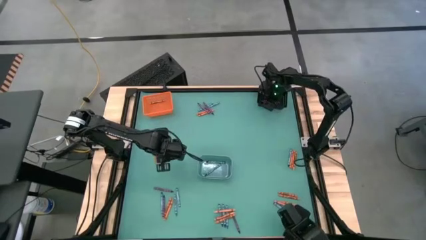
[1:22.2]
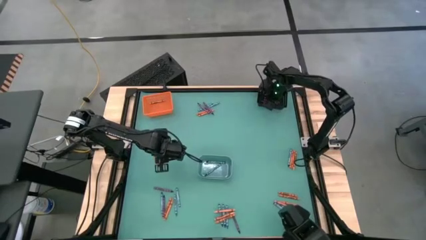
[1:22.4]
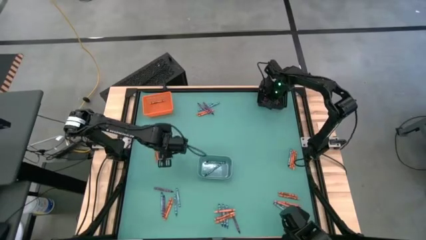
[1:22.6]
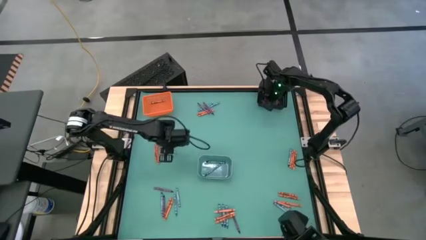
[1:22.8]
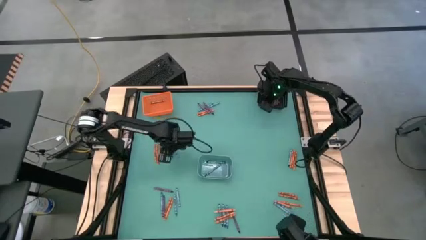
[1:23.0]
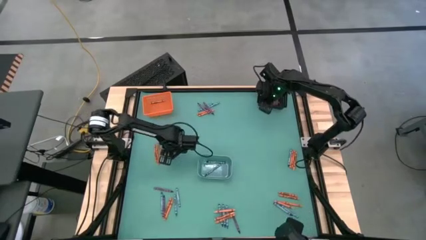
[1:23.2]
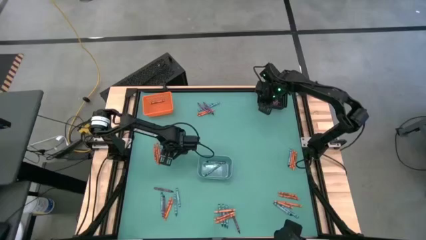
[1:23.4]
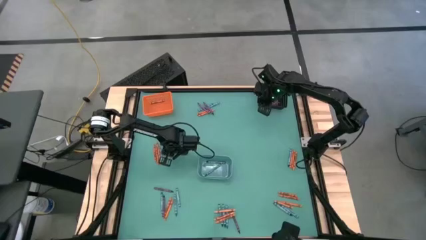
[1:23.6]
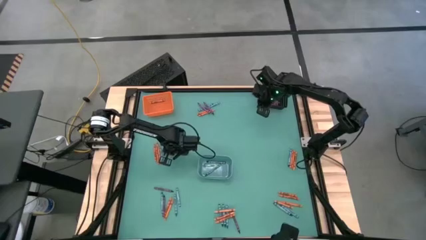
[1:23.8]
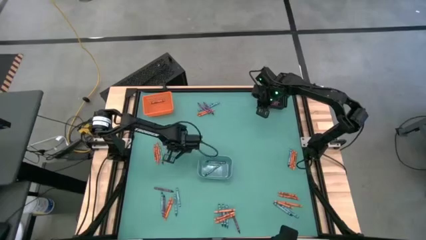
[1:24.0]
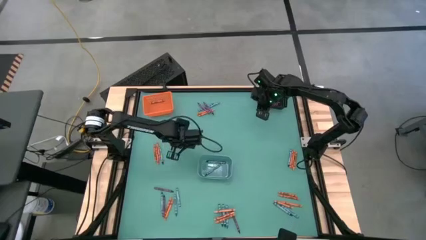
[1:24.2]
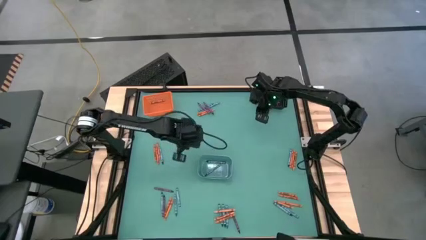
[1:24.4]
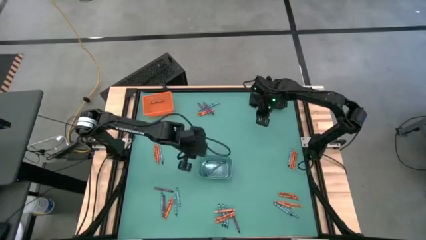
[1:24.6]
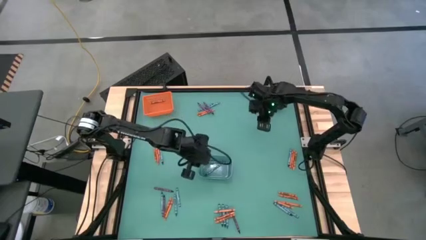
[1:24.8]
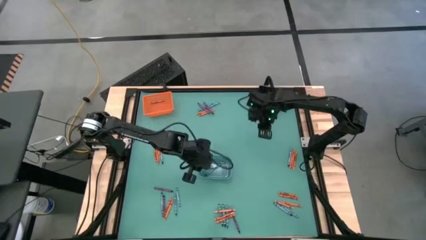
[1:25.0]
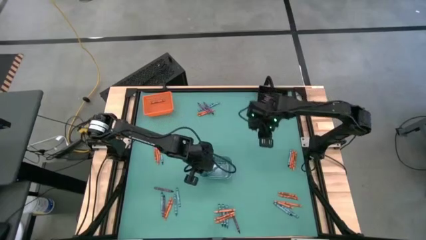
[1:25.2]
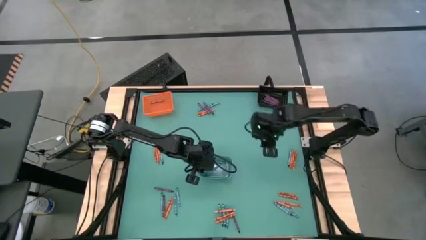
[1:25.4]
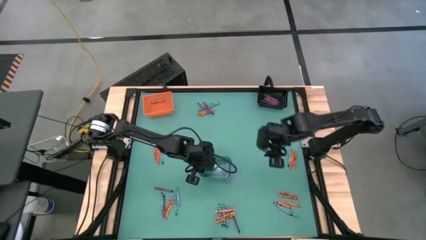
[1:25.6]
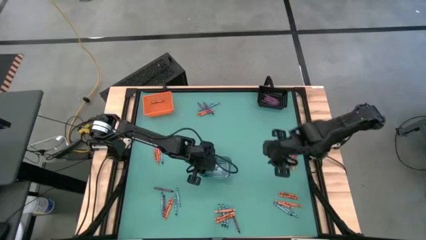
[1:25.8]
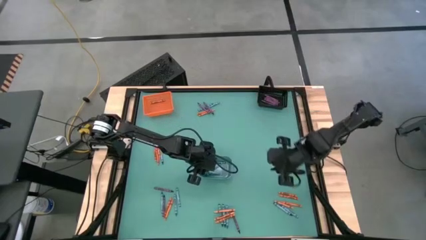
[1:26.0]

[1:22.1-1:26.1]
Task: Sort crayons
Put the light blue crayon into the blue bin

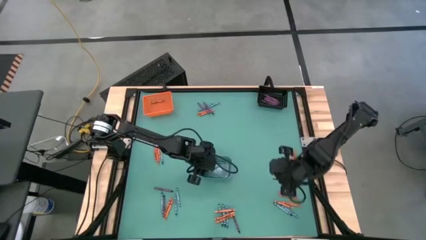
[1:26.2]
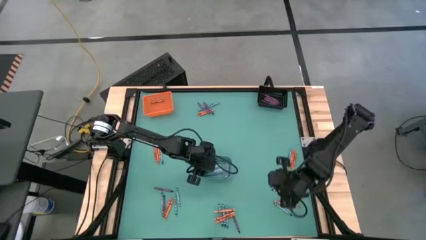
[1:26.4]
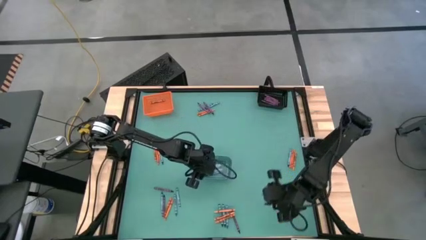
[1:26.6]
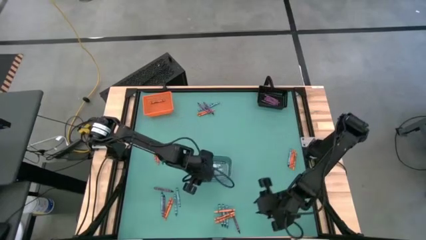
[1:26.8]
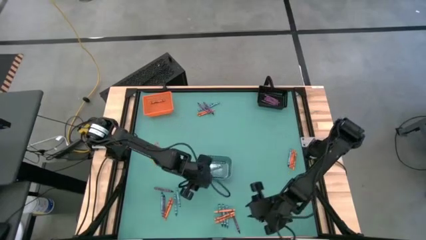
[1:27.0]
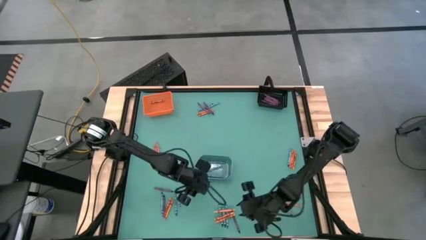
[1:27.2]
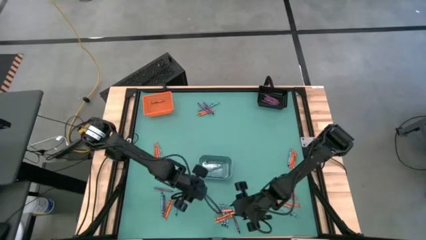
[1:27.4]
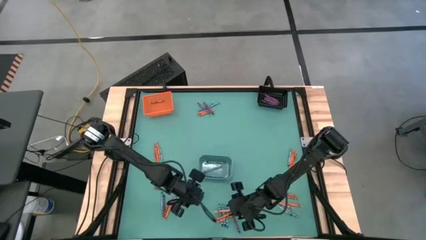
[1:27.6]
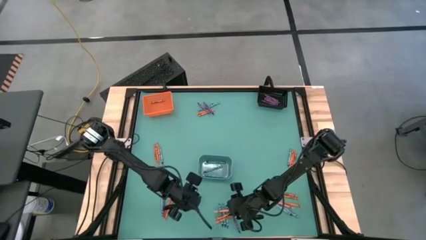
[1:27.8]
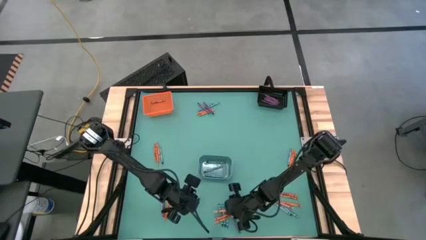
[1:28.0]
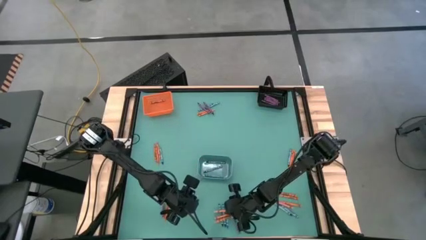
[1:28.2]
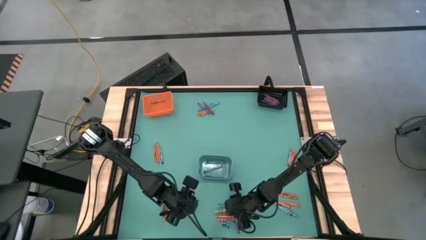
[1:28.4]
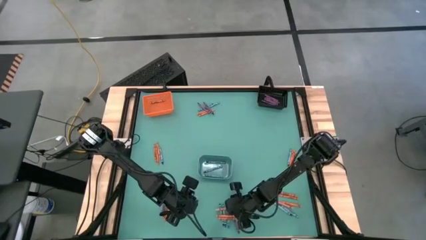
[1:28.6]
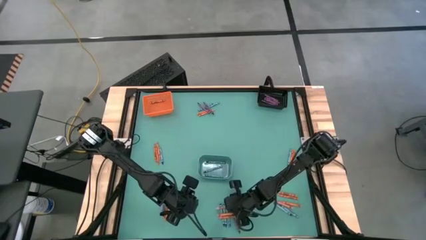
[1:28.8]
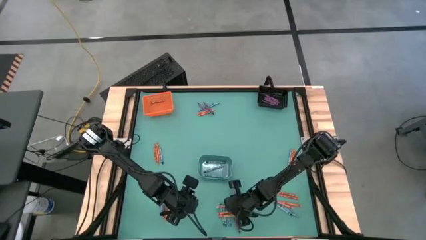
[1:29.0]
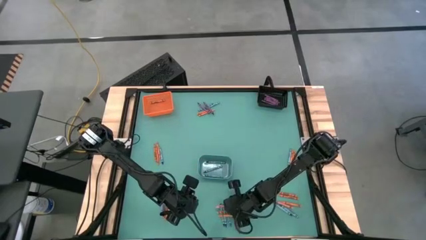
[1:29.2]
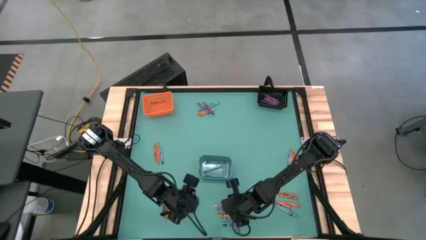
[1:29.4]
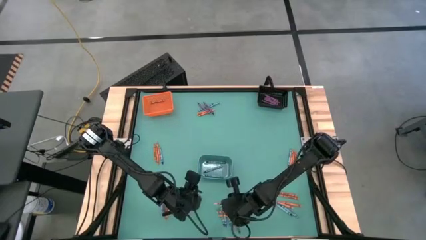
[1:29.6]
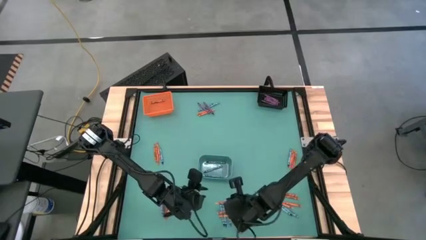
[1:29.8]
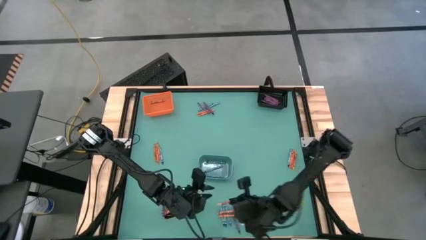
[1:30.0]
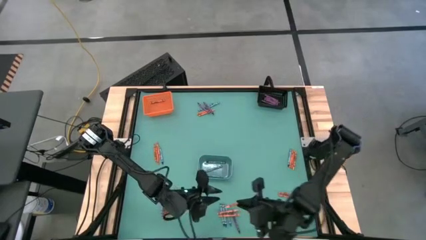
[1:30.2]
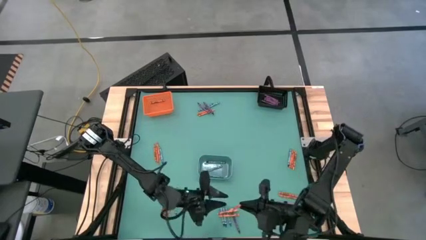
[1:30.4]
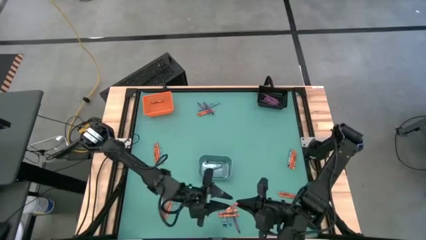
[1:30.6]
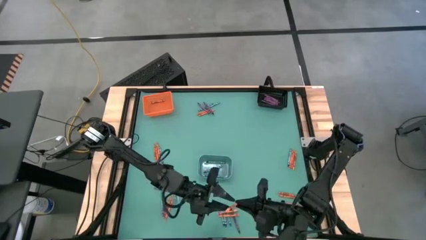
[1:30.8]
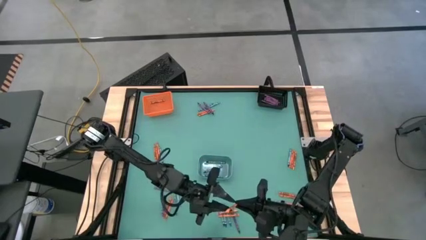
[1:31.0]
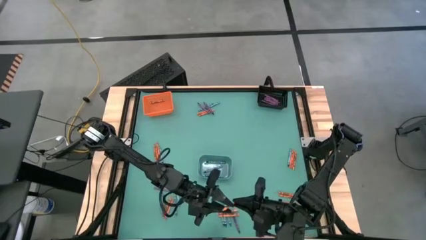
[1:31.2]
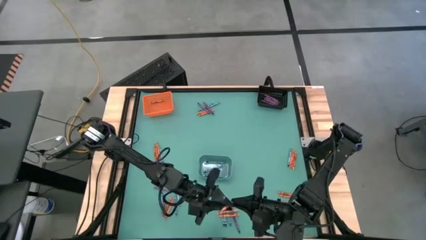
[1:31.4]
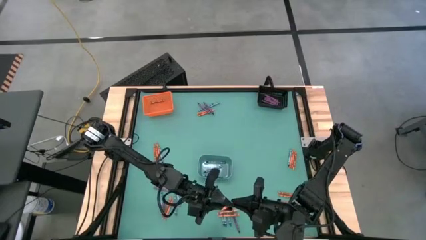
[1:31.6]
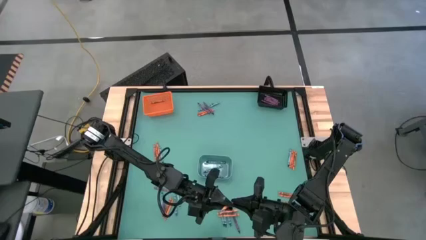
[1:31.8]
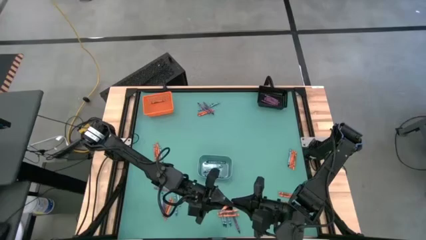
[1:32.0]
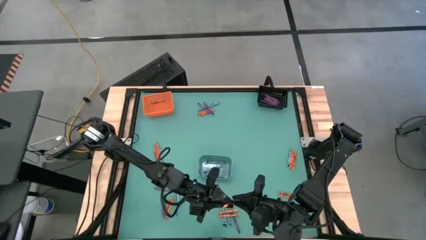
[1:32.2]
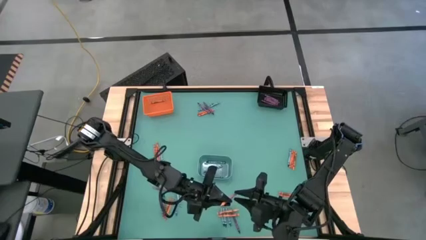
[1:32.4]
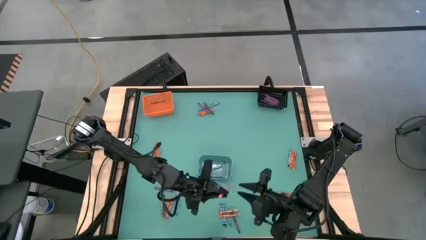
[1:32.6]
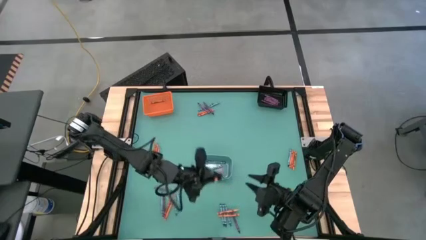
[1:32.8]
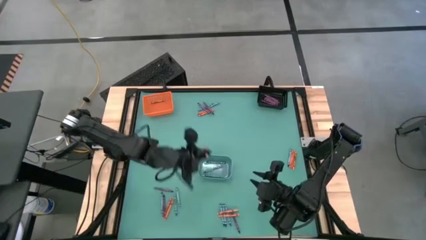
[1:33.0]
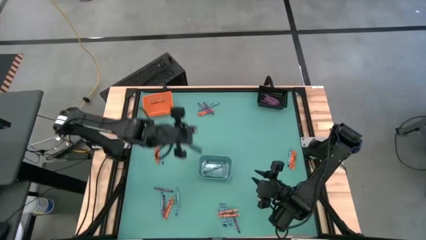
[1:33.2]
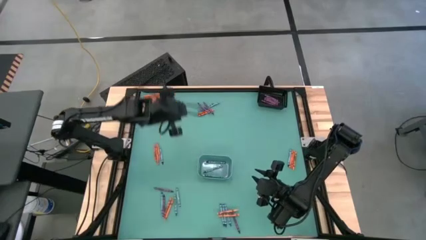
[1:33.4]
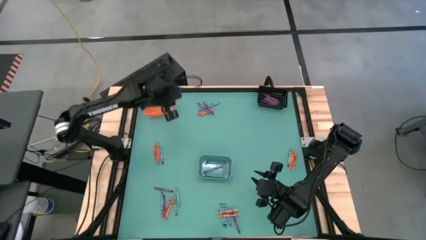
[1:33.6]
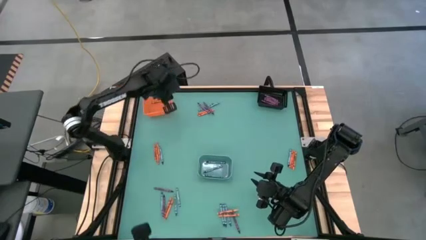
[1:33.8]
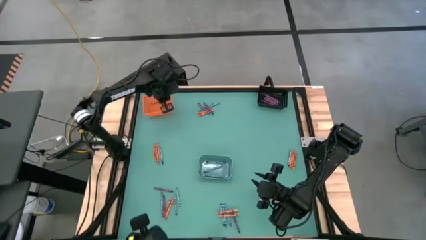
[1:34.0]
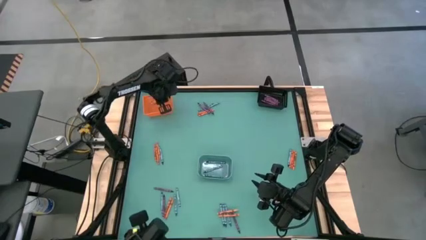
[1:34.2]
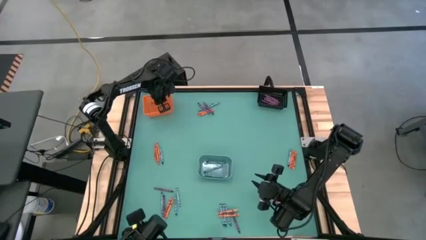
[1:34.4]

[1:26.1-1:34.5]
Put the orange crayon into the orange bin

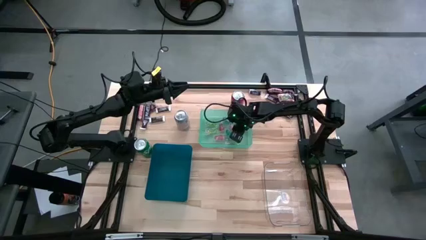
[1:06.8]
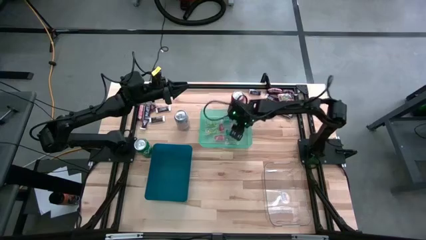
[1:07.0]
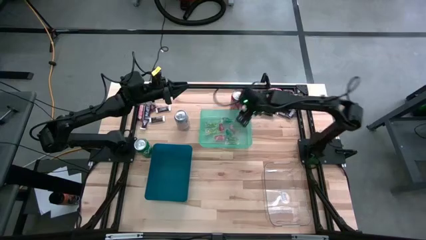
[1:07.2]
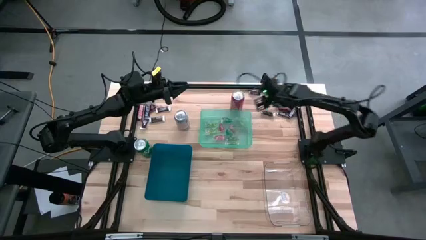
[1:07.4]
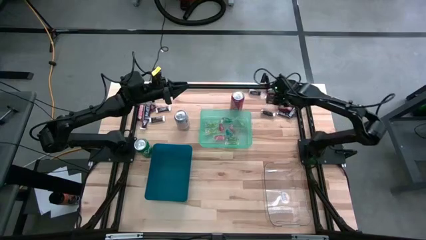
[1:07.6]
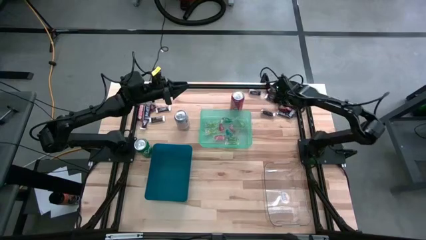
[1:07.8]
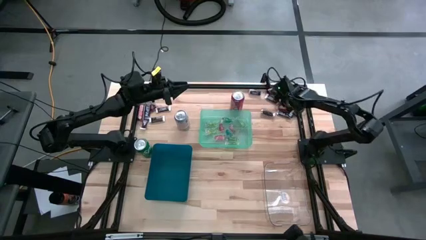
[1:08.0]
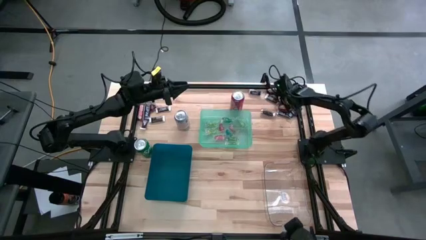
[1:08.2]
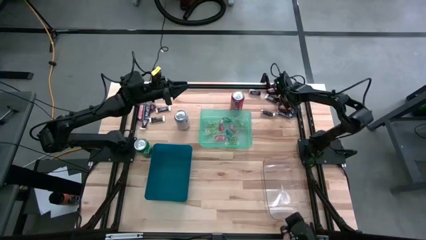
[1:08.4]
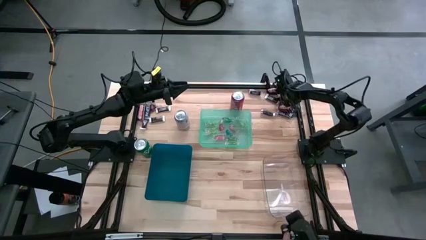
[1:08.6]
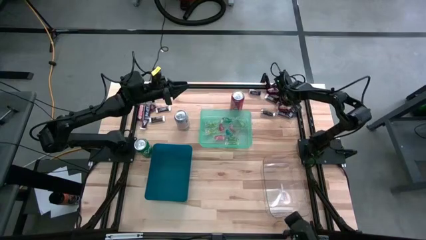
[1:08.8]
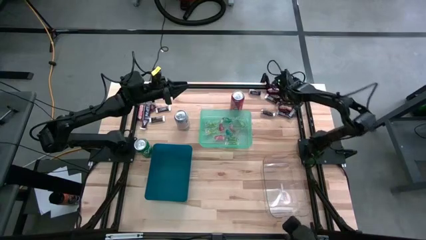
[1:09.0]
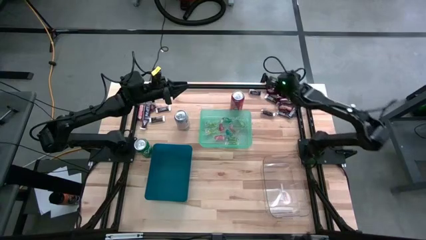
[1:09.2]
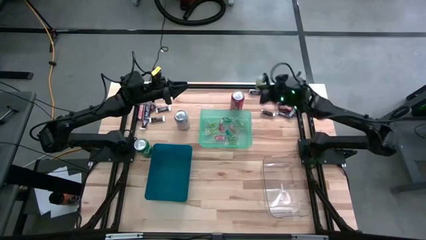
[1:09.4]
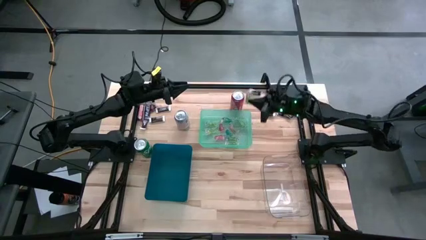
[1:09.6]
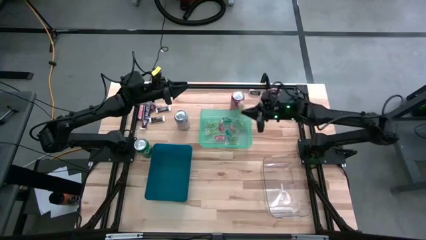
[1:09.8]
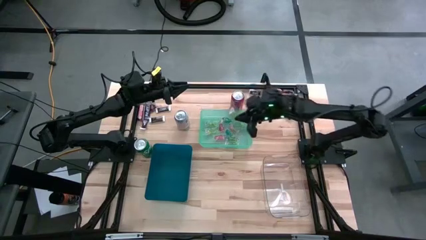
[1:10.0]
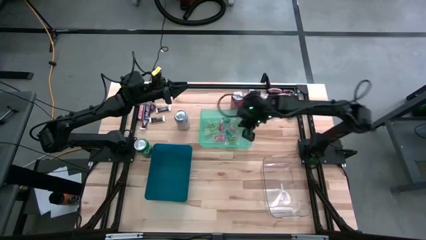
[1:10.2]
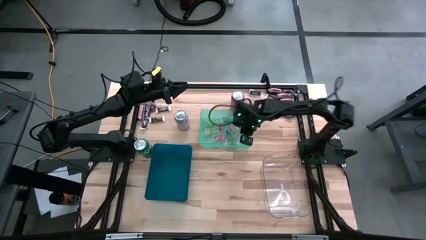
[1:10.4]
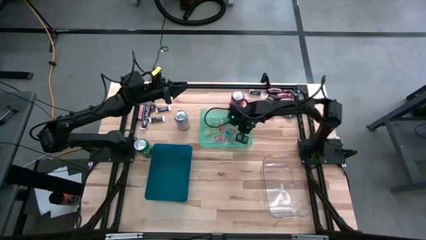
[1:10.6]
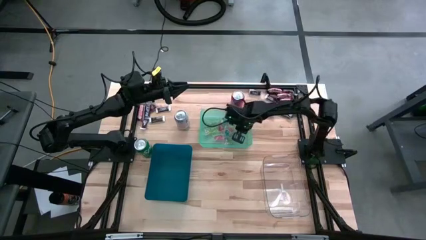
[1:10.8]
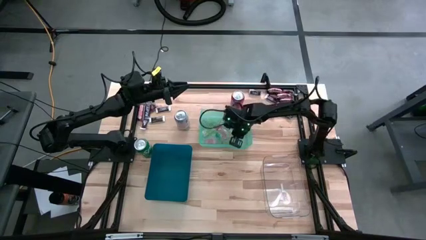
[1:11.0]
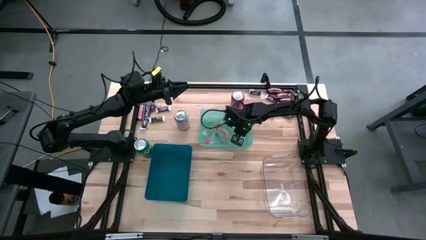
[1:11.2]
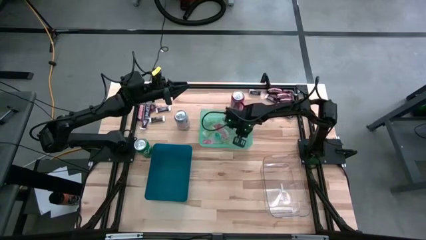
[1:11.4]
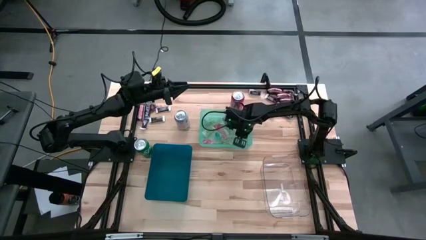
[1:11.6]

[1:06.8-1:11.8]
Task: Organize candy in baskets
Put the green gummy into the green bin
